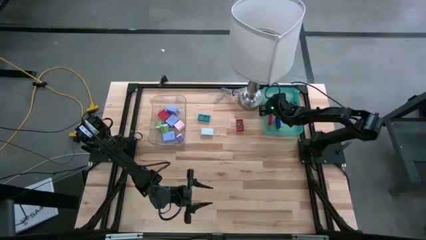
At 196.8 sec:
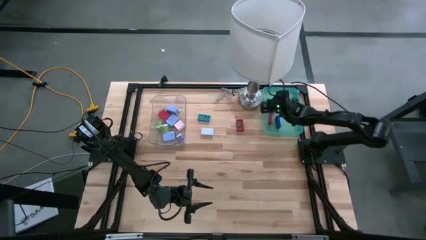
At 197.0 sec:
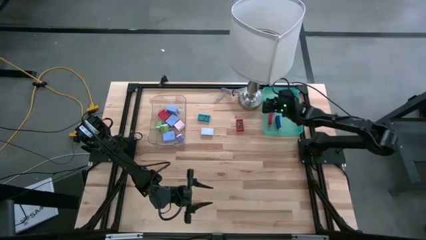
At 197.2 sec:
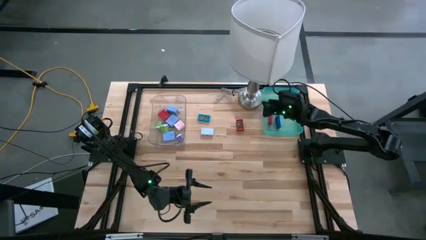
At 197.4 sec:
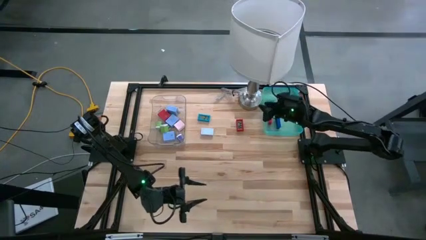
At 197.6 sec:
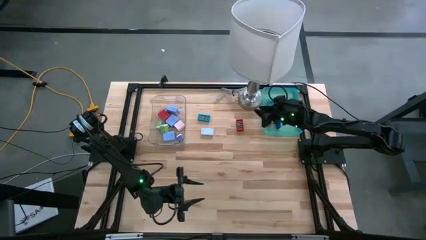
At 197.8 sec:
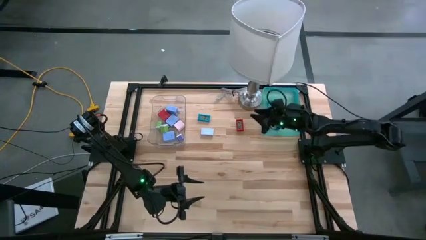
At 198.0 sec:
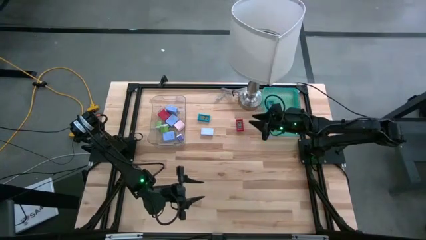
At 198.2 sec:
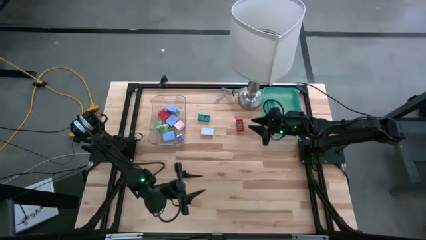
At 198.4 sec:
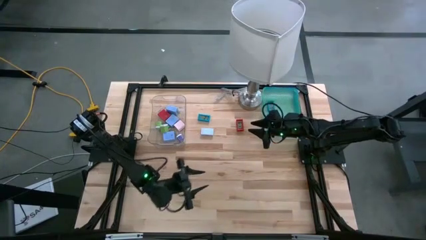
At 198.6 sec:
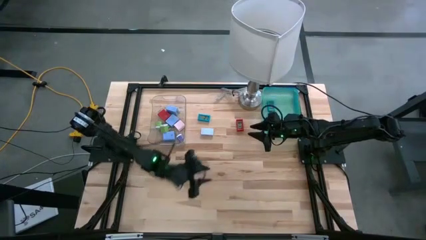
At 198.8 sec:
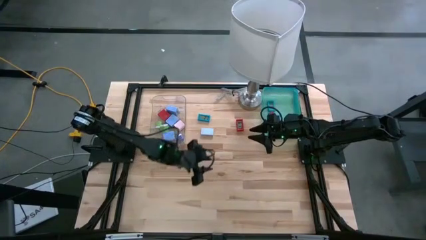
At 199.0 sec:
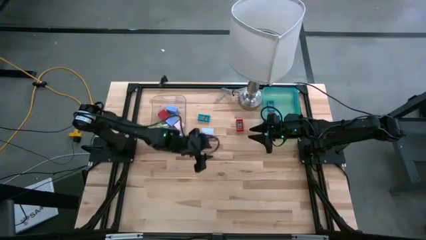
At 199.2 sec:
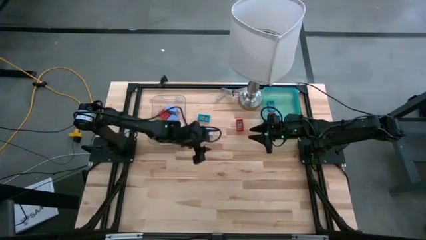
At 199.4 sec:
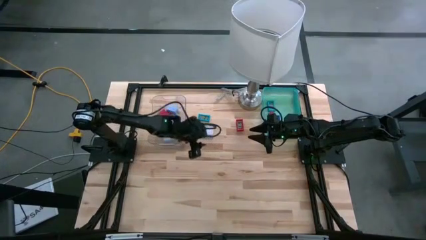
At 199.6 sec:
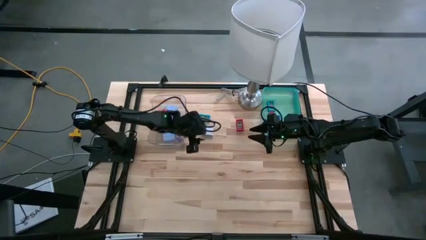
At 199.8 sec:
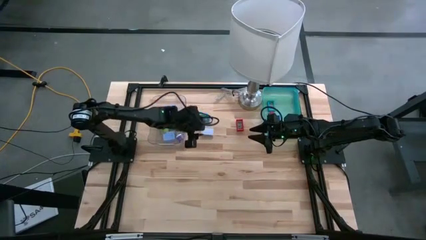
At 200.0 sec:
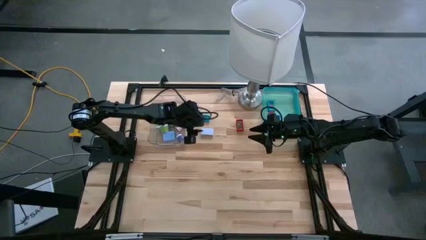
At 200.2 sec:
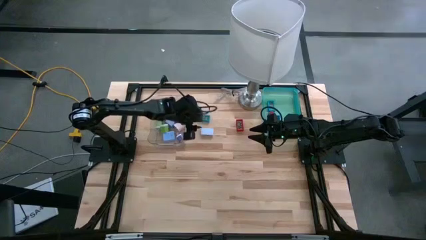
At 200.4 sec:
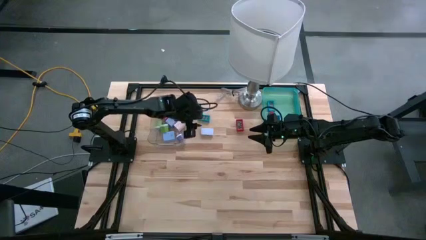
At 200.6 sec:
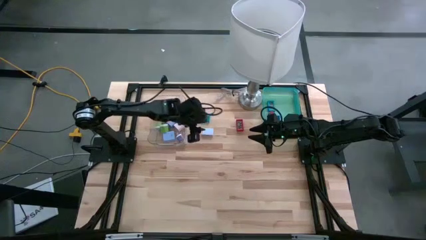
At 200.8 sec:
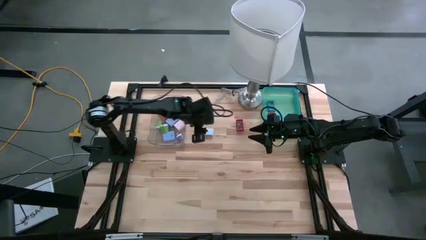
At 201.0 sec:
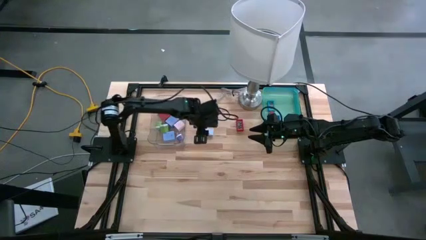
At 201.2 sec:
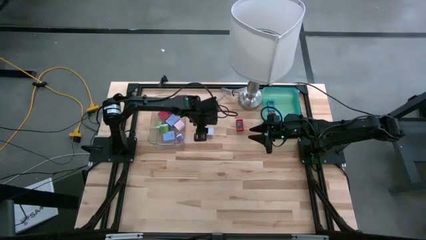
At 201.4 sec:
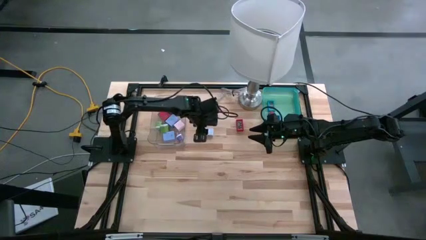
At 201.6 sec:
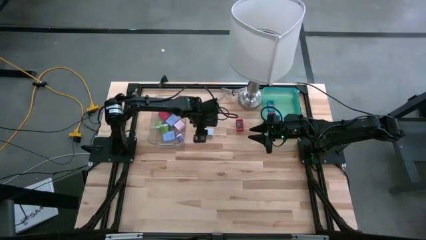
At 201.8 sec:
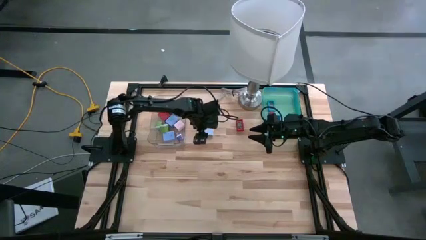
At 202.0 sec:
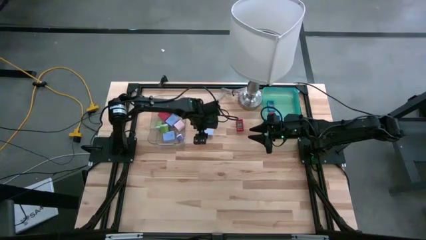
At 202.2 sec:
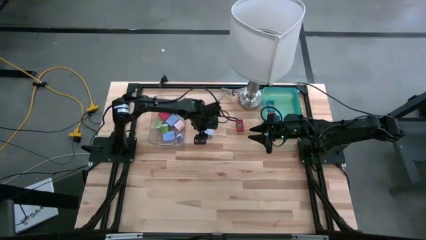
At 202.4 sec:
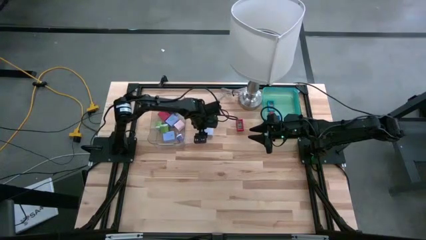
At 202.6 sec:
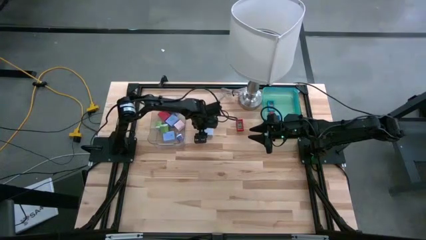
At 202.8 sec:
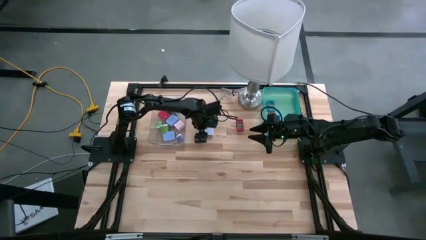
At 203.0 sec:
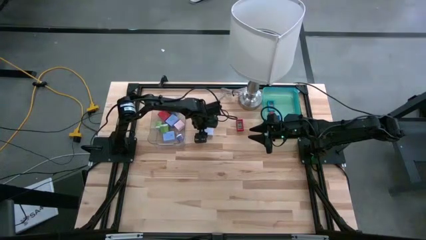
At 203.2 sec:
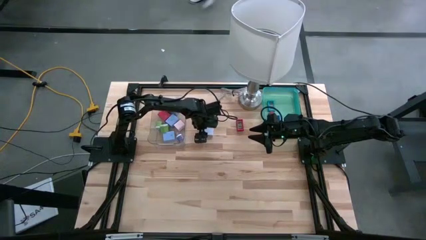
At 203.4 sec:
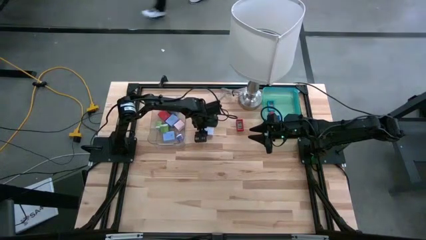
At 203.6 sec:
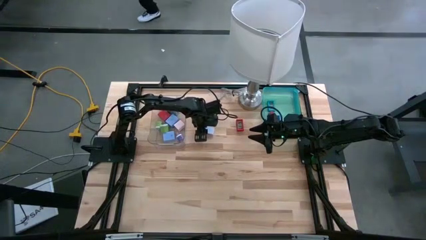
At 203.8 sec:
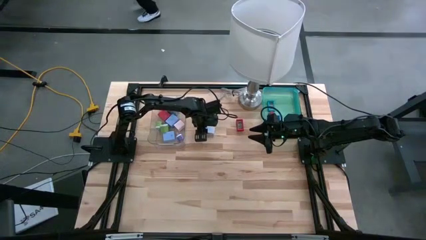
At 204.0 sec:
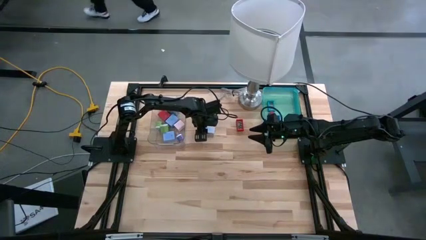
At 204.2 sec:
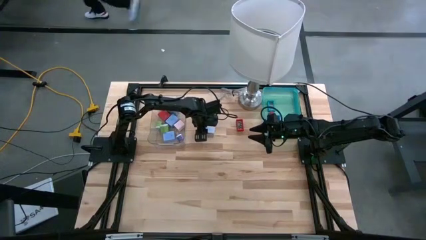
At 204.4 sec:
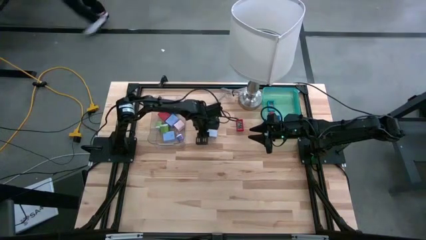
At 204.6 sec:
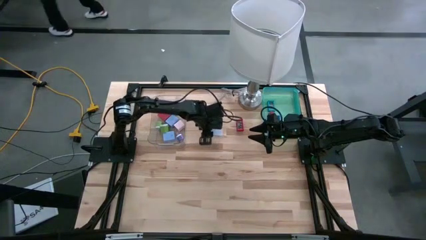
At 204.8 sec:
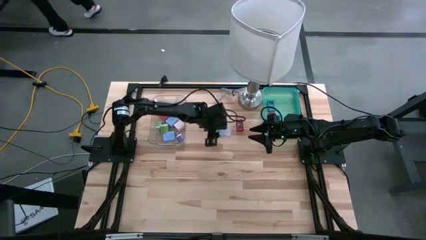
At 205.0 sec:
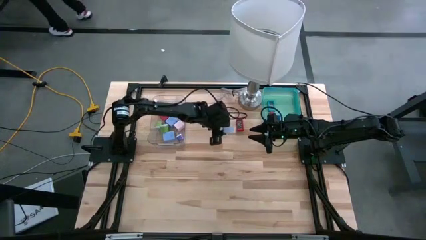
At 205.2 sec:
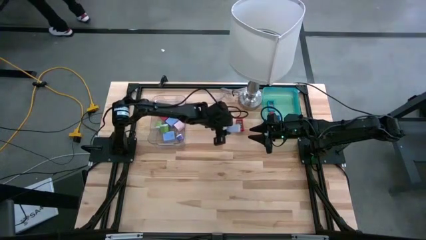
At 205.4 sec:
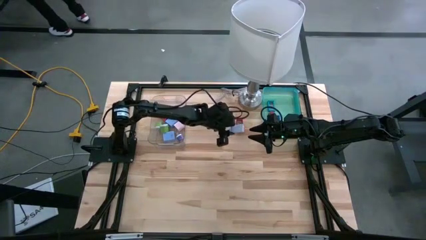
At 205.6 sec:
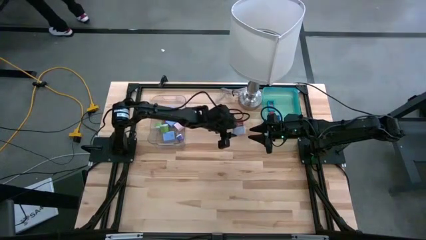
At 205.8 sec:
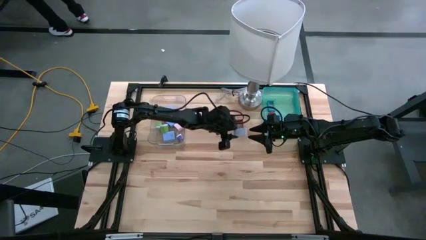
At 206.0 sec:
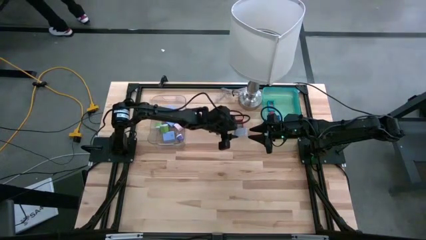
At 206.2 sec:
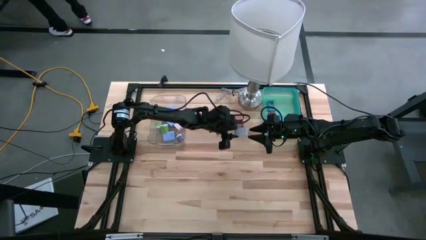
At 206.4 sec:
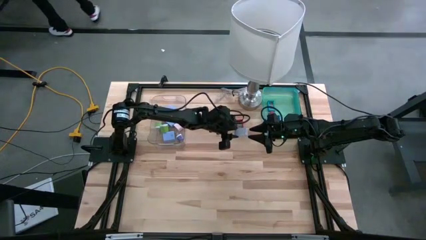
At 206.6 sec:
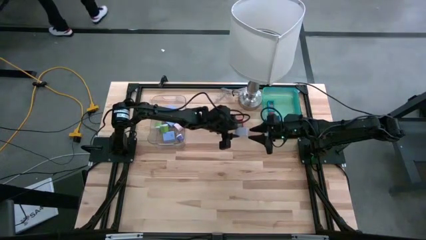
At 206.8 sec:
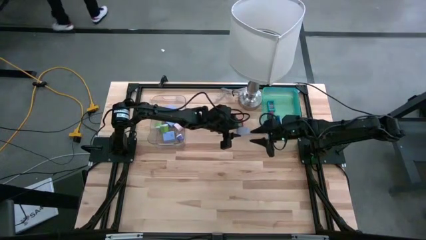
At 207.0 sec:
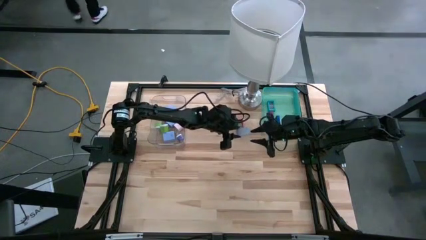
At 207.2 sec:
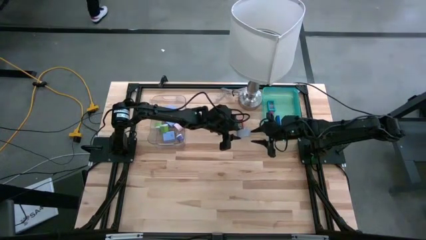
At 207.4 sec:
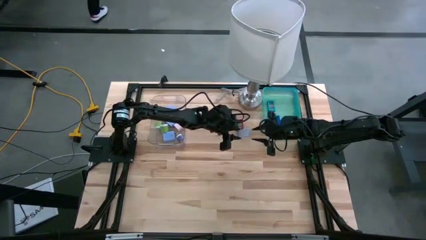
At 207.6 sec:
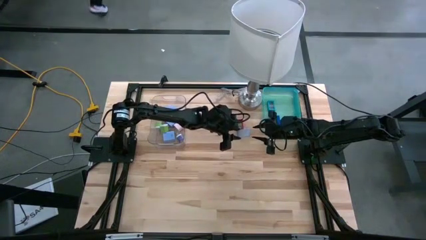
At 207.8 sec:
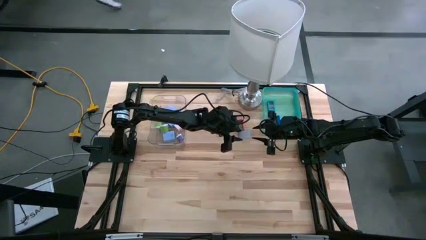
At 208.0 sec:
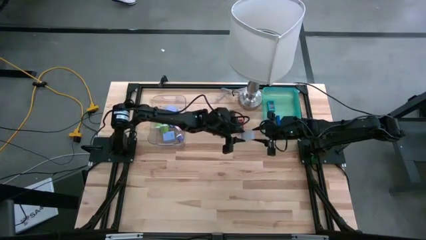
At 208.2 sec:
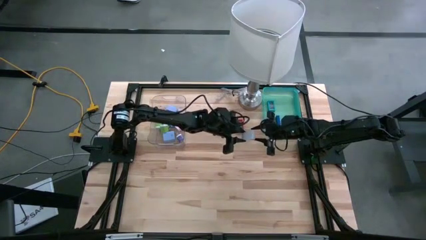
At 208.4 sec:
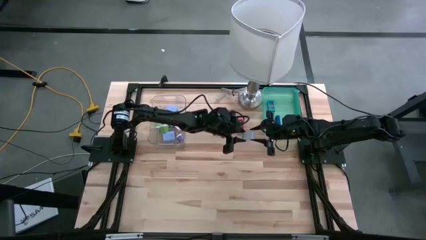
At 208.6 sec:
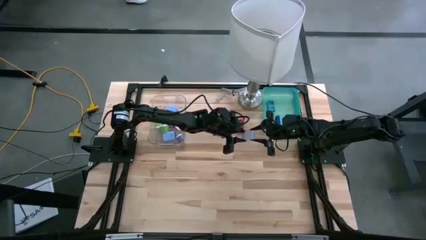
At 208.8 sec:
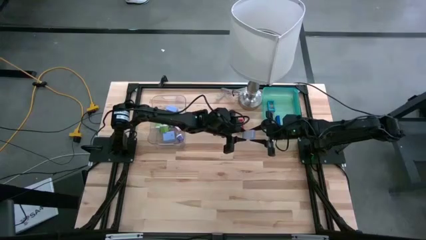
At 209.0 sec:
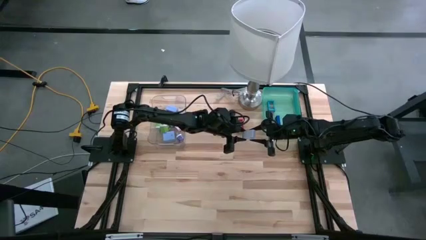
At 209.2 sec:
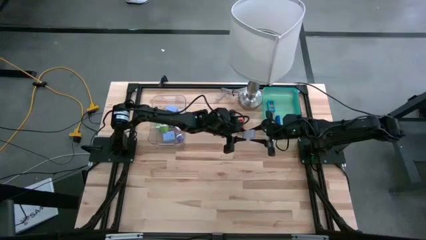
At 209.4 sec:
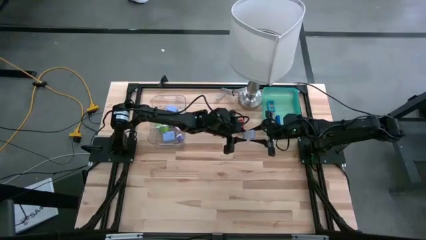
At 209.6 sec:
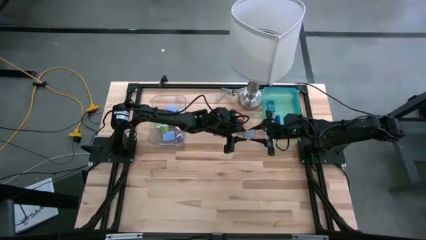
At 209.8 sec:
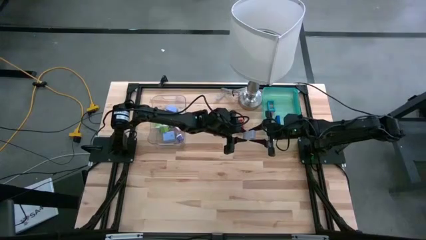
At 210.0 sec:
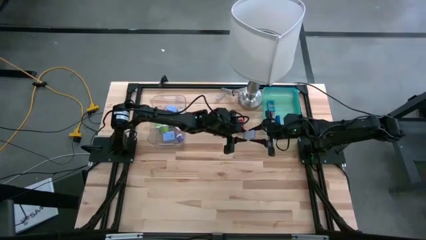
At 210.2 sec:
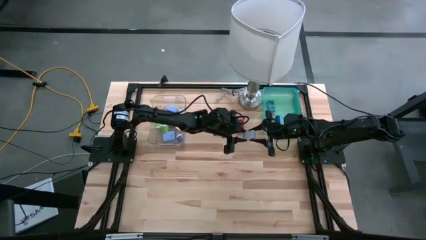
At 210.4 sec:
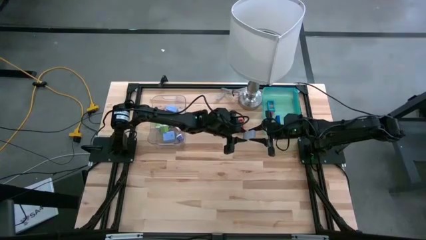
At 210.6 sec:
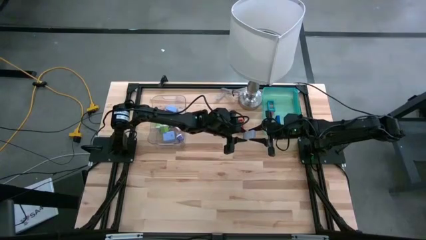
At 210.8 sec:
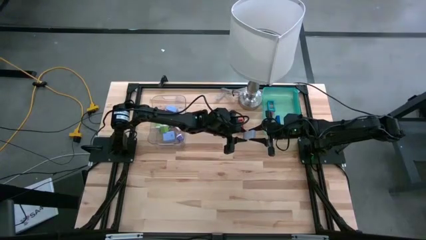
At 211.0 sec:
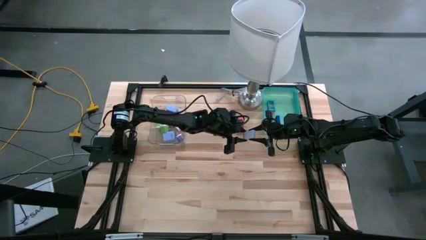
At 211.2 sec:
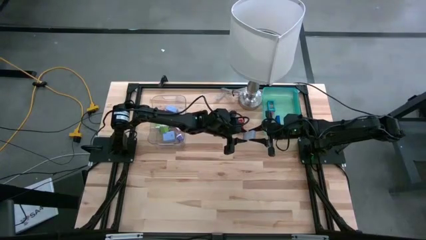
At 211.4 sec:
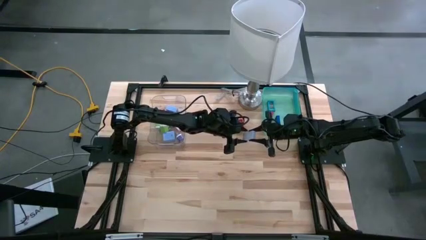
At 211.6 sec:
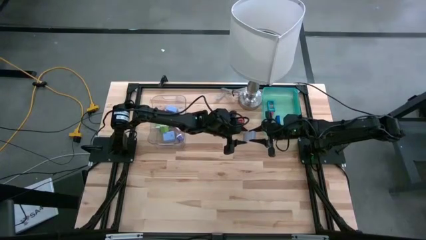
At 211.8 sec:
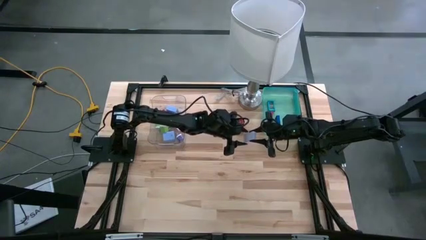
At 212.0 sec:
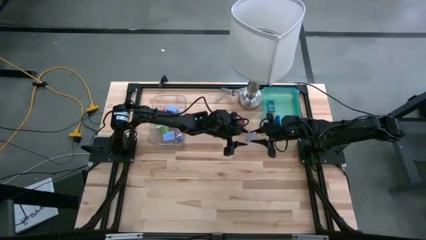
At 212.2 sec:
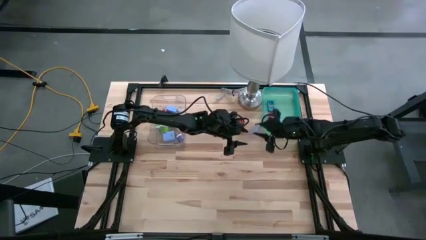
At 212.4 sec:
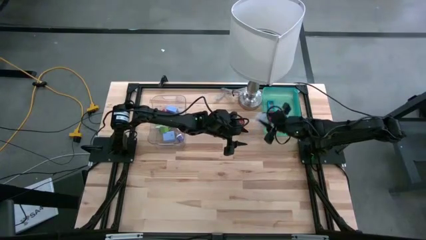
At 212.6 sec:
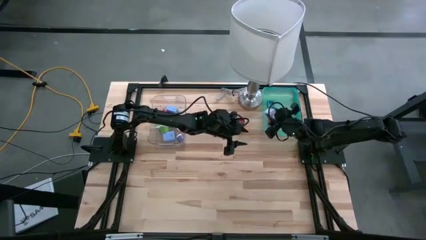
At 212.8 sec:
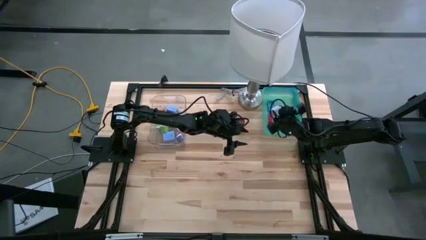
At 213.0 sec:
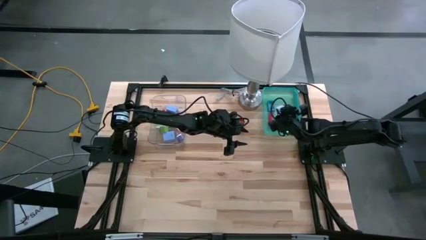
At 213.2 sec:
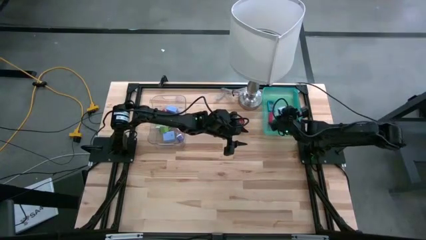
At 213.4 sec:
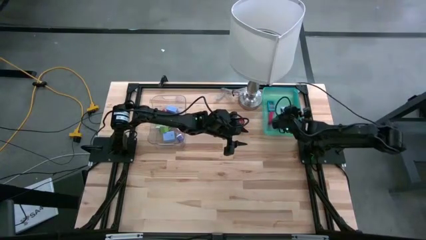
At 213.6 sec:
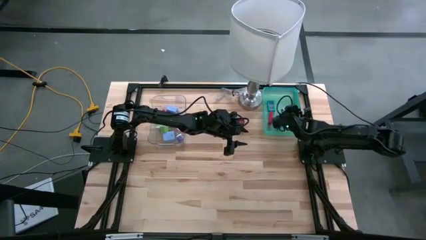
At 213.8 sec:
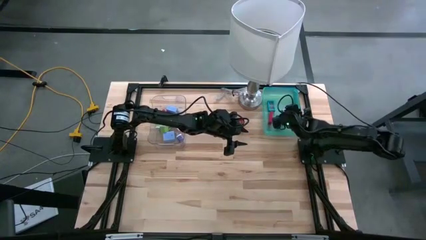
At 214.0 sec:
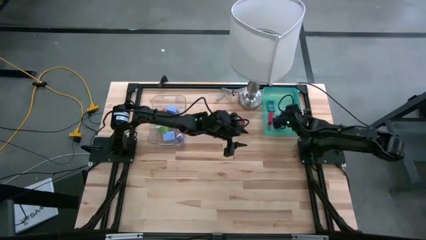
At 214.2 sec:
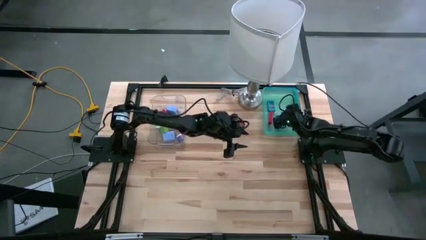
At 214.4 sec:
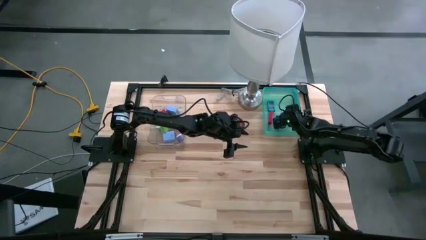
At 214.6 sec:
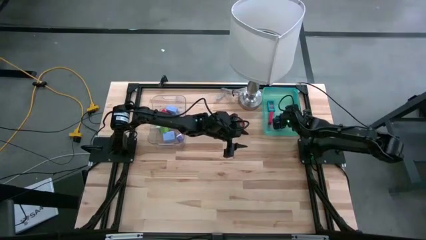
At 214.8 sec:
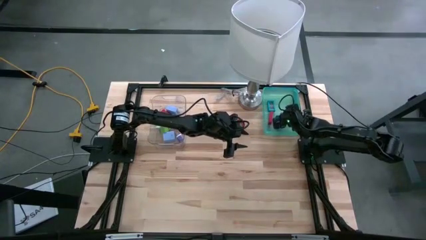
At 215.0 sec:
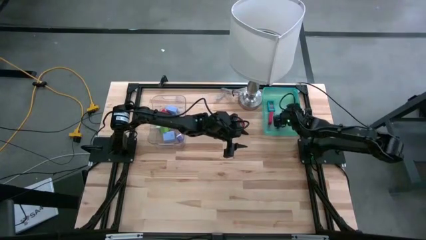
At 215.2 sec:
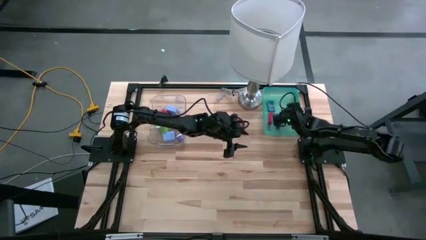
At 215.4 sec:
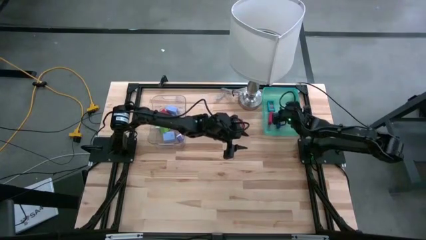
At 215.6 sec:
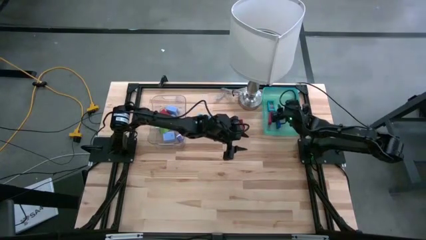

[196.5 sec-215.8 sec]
Task: Pick & Place Office items
Put the white mini digital clock into the light blue bin
